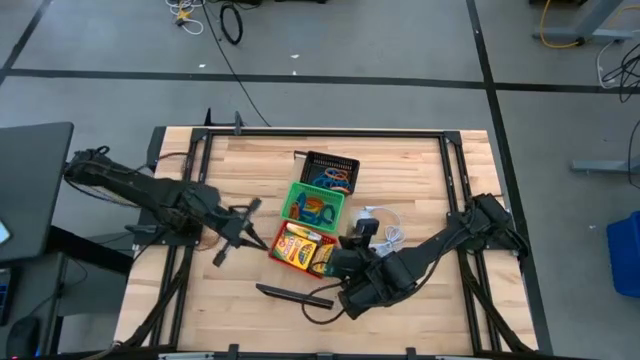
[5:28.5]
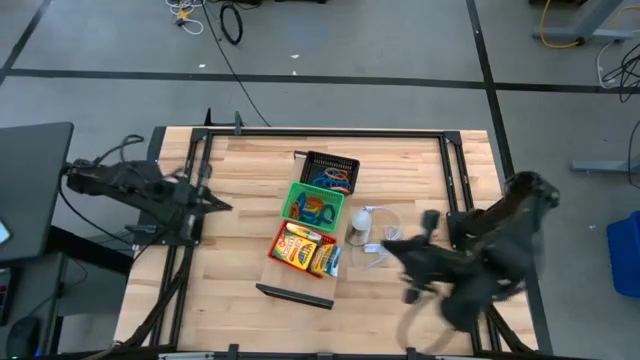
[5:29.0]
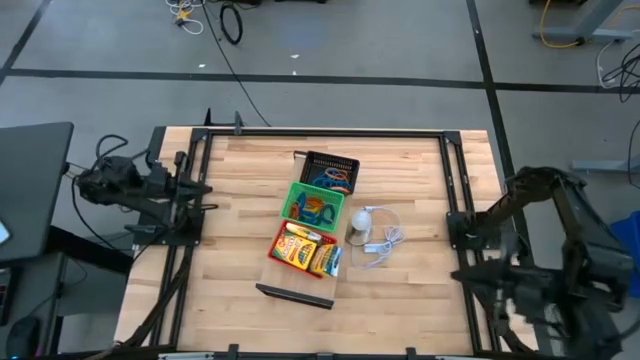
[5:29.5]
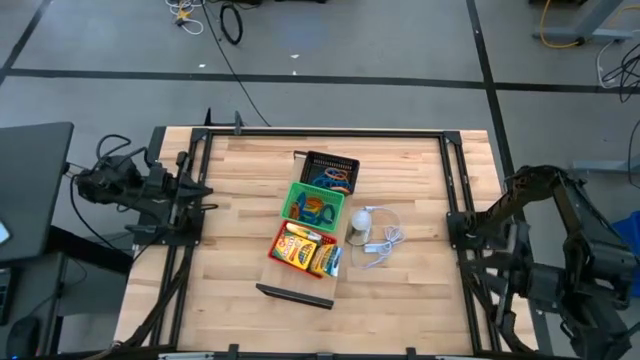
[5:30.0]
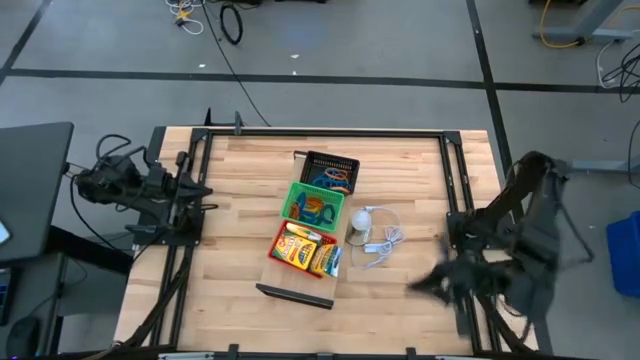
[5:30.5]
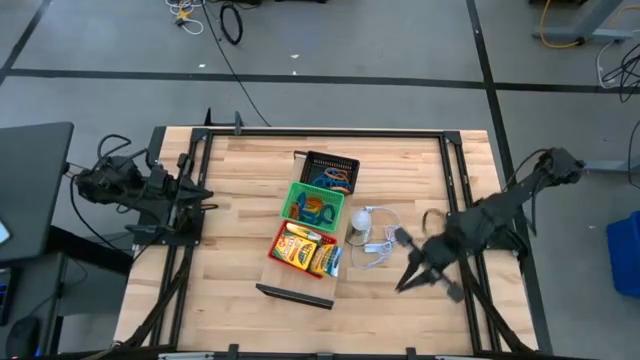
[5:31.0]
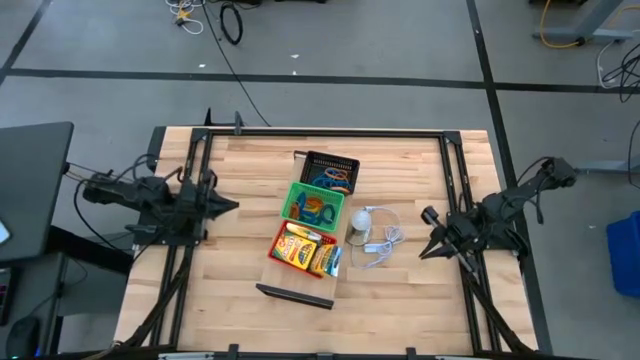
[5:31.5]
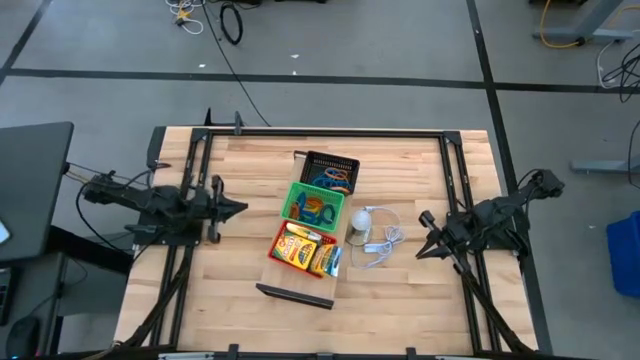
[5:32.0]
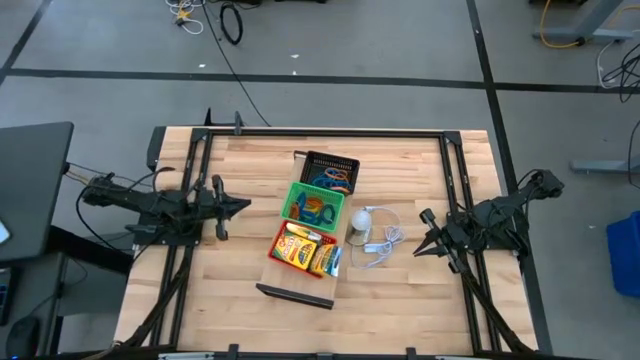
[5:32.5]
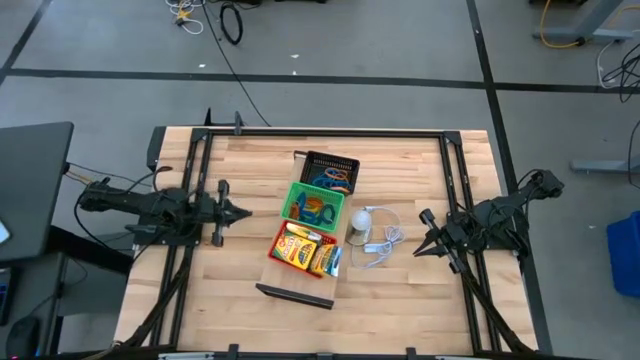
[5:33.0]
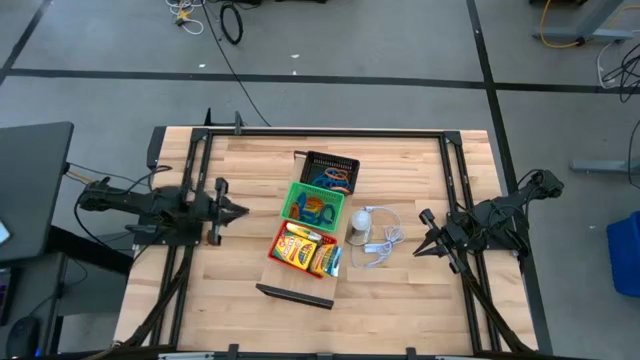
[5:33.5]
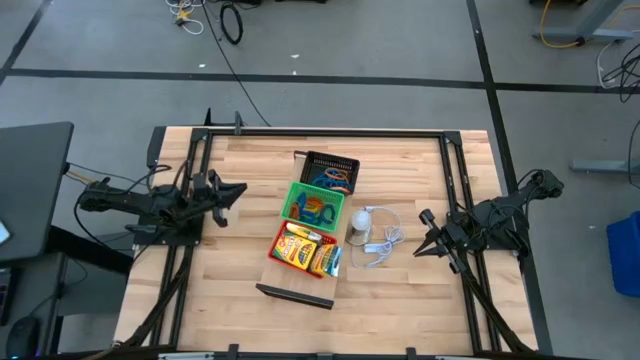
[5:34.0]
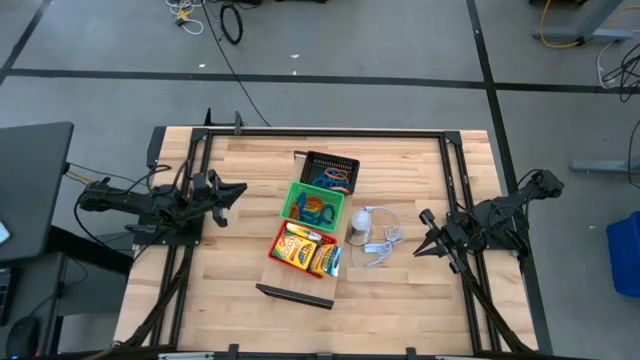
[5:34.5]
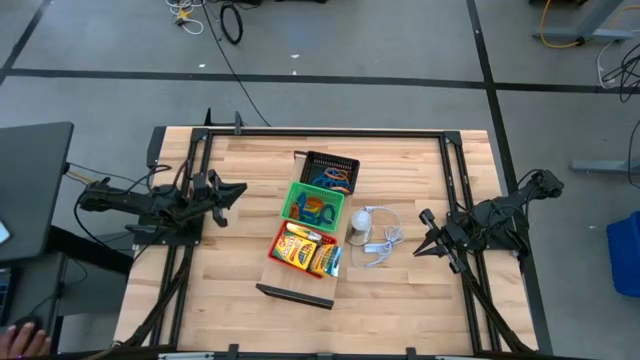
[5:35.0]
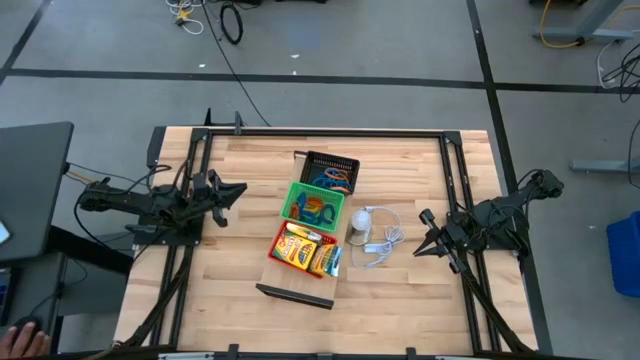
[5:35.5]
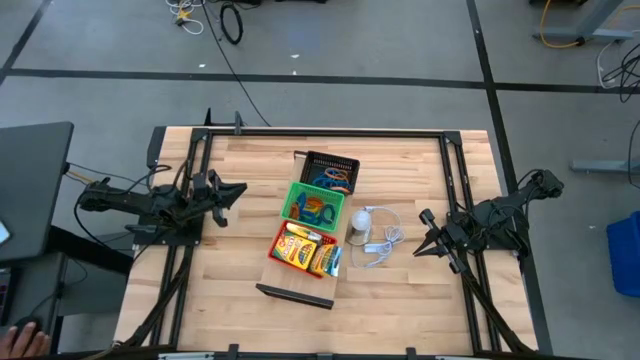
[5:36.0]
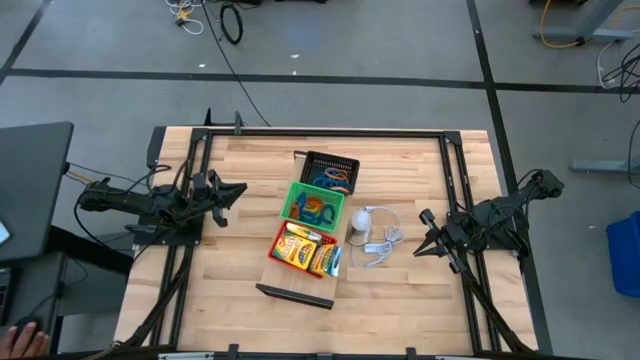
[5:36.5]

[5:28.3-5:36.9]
Task: Pick & Place Office Desk Supplies
Return to Home Position

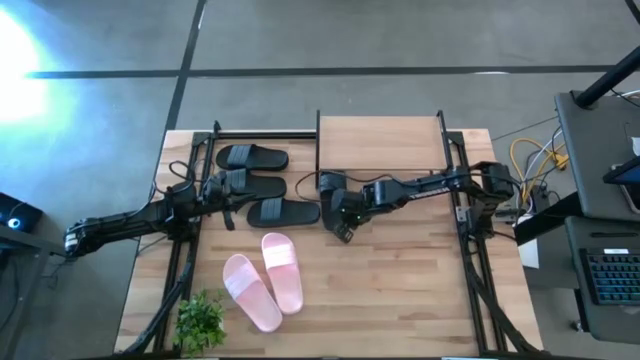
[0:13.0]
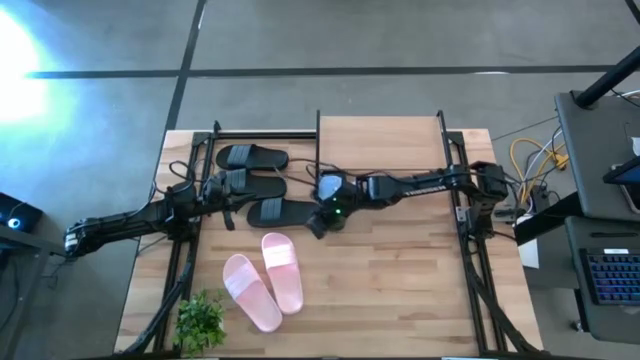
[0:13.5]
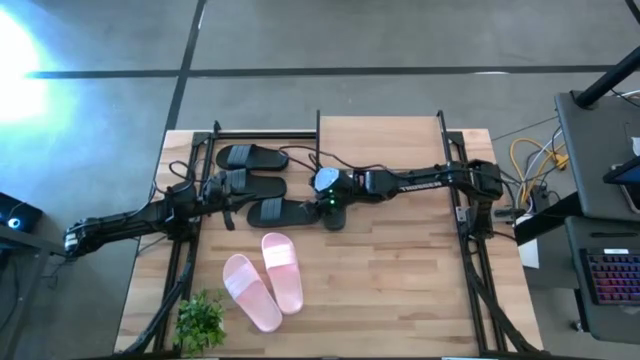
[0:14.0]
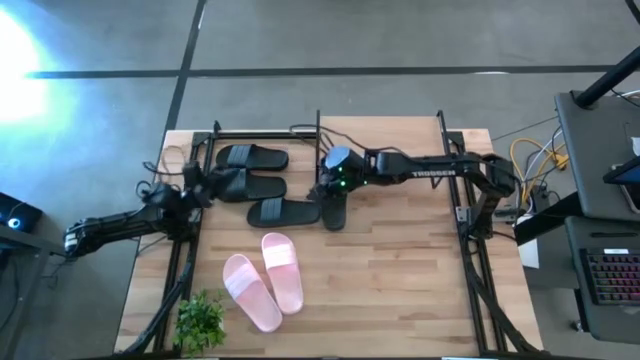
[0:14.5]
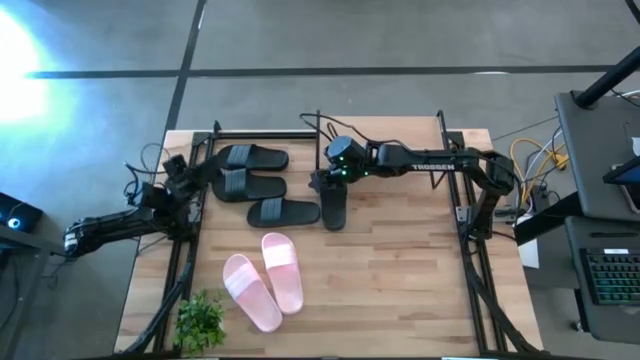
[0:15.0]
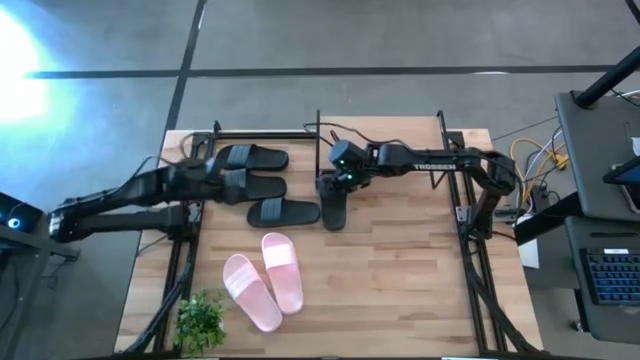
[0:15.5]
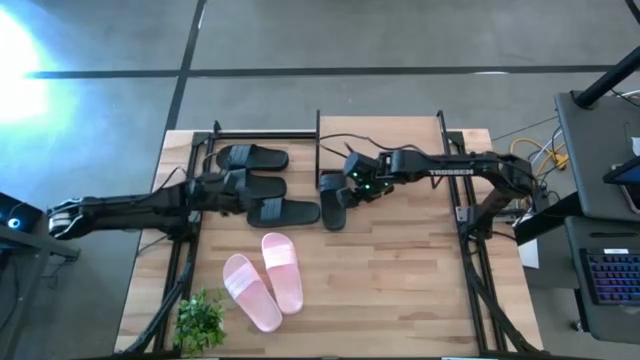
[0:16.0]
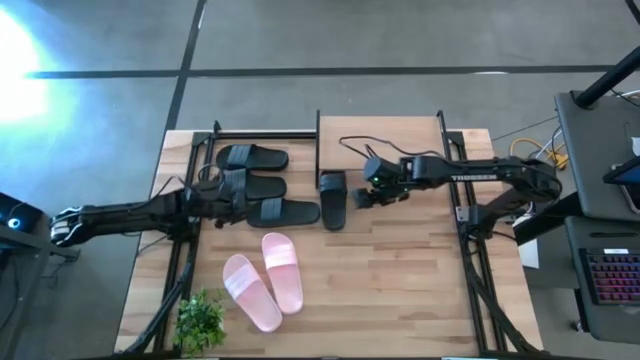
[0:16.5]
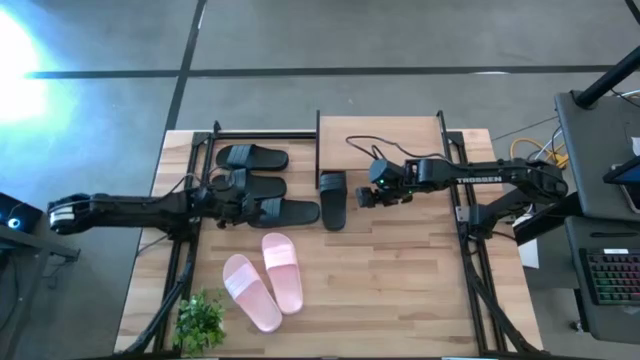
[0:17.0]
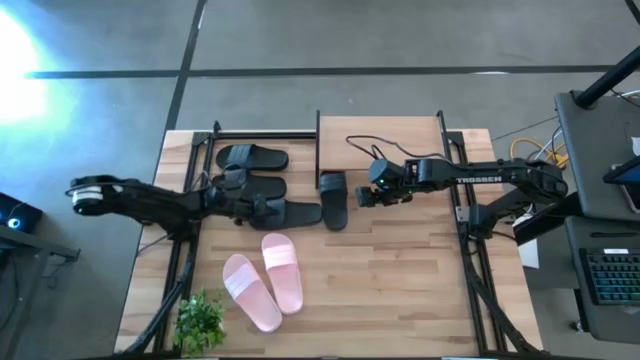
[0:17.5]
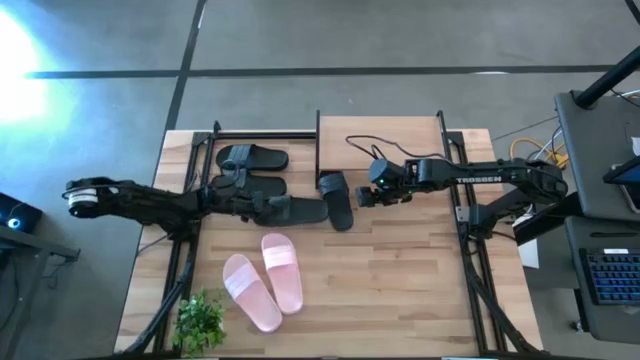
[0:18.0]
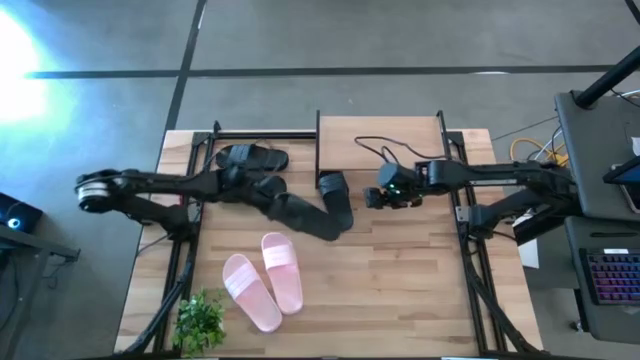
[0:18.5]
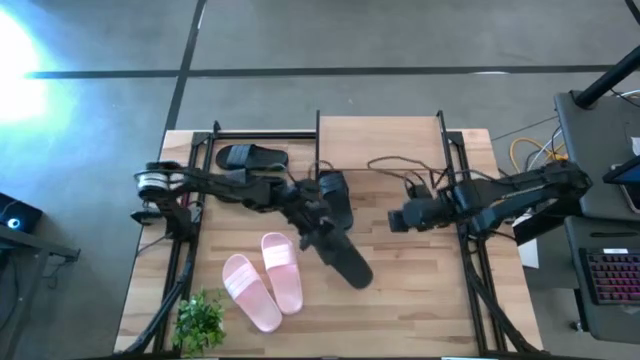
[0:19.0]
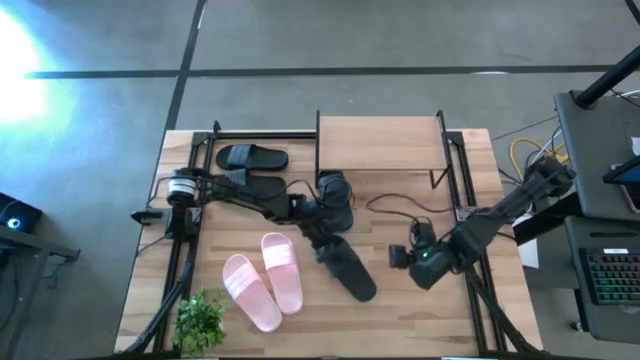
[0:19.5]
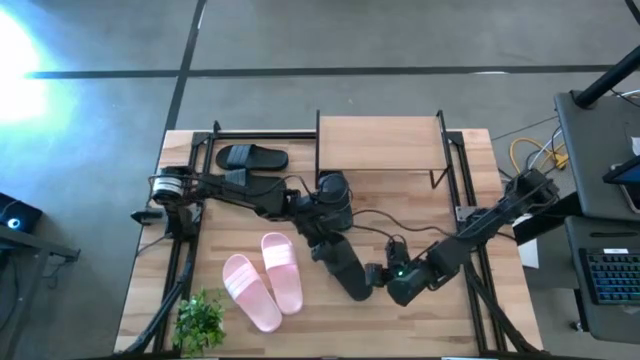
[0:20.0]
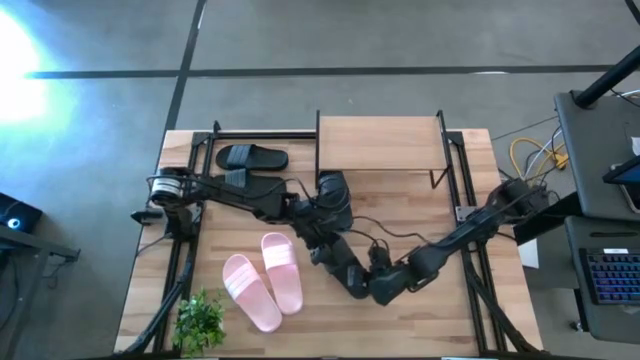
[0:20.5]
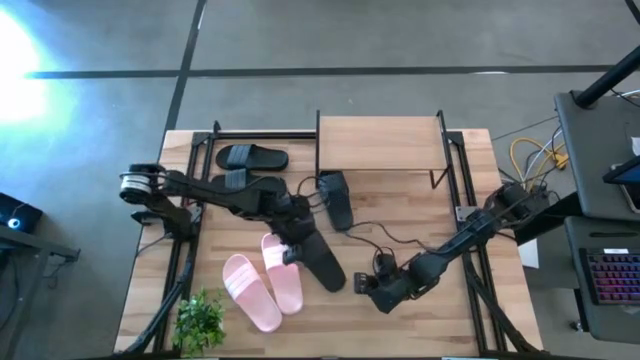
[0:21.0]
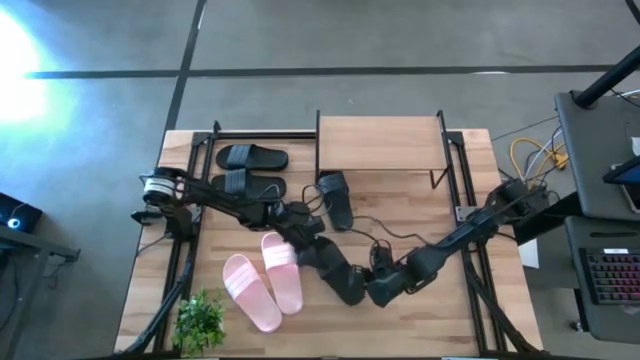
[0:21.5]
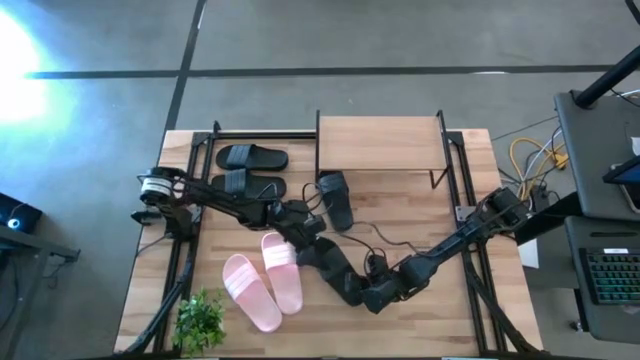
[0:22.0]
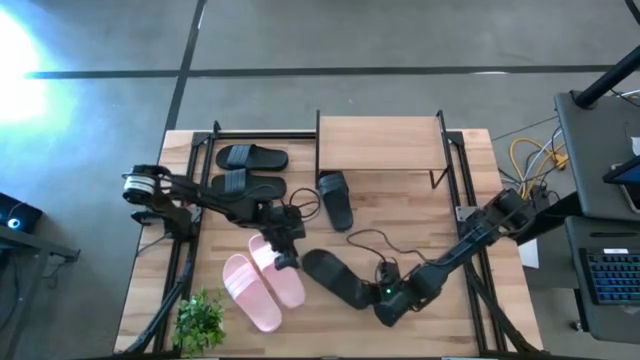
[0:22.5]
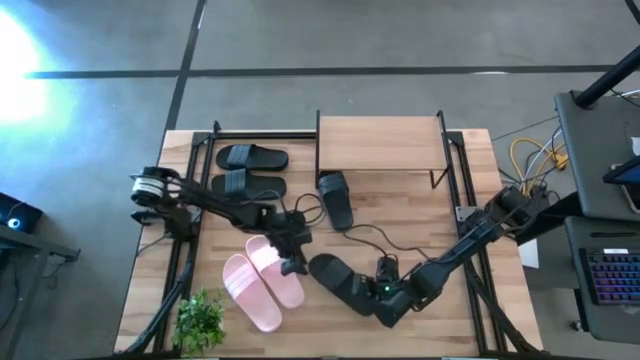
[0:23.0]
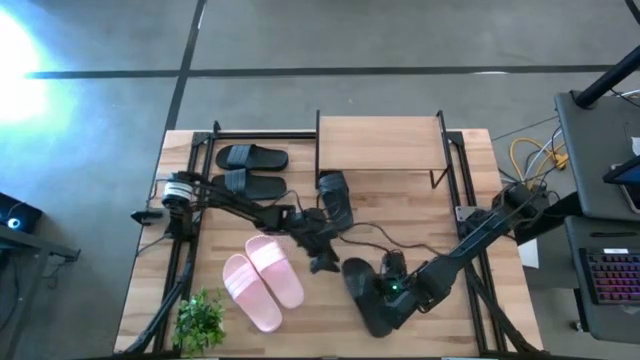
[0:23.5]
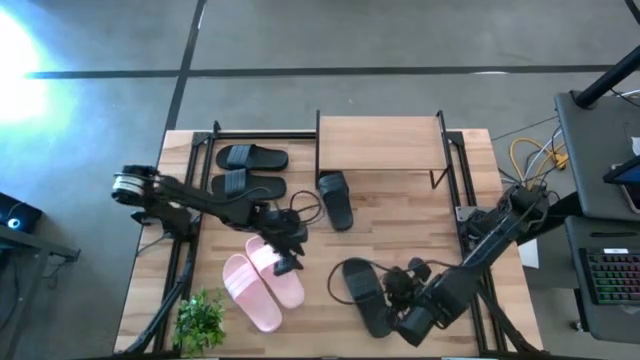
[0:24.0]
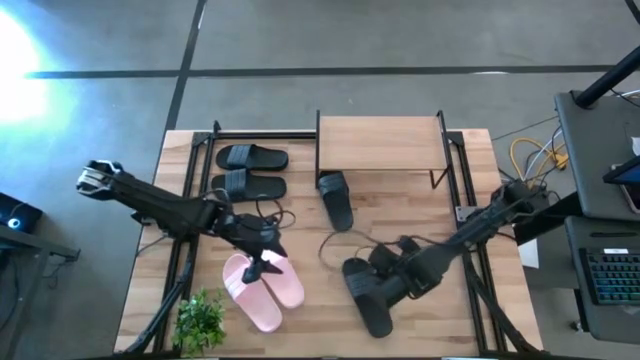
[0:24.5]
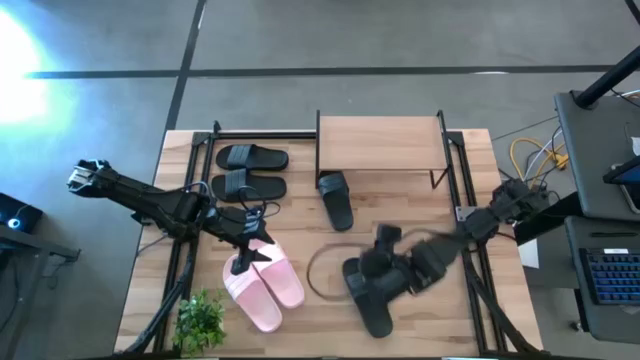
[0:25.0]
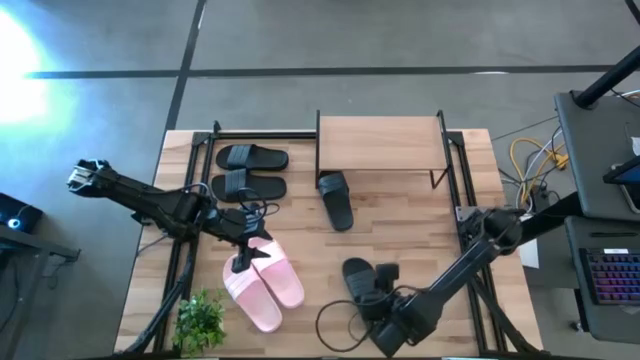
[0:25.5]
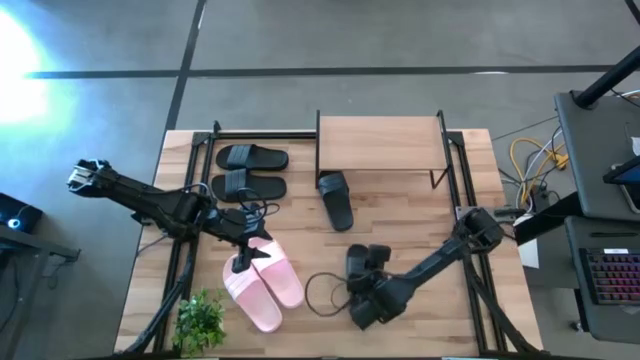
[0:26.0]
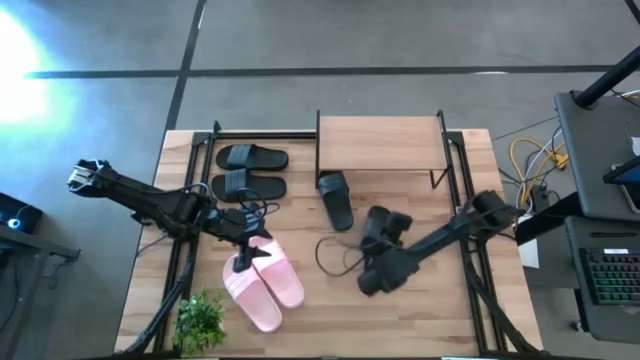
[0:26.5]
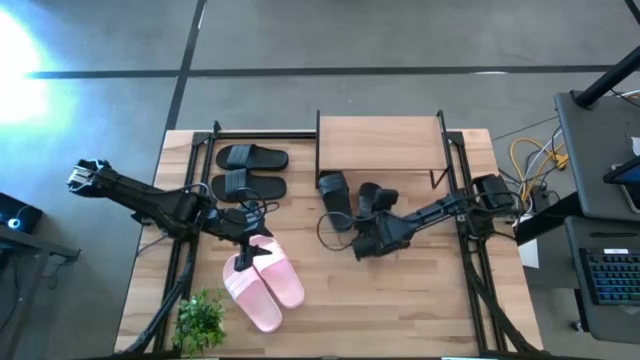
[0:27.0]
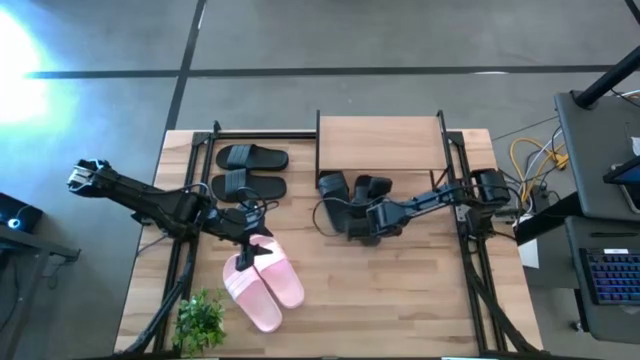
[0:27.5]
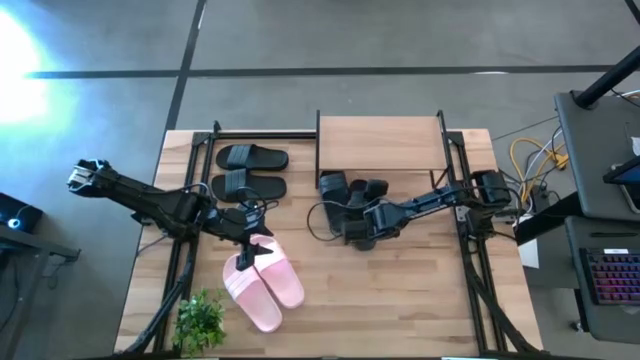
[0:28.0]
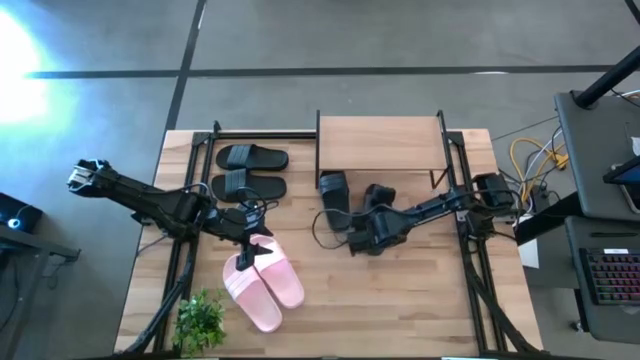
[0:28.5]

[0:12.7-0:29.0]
Task: Pick and place slides into the shelf
Put the black slide under the shelf
